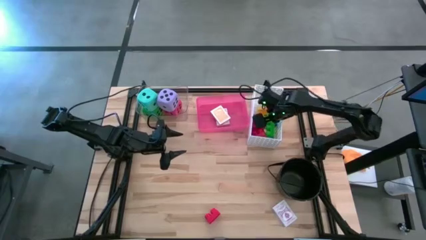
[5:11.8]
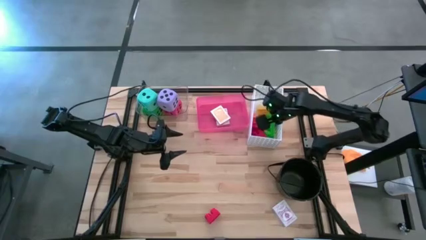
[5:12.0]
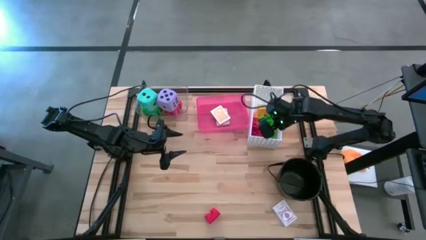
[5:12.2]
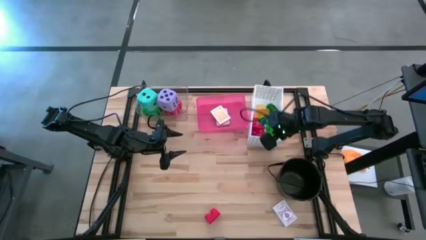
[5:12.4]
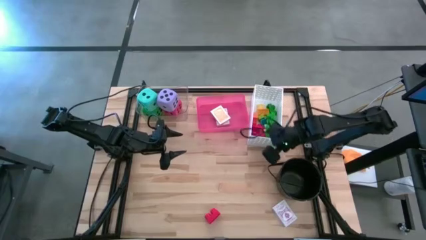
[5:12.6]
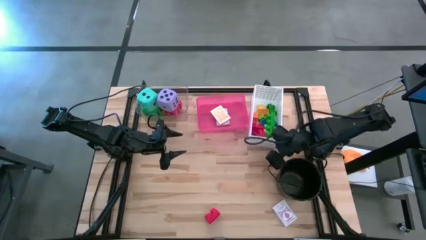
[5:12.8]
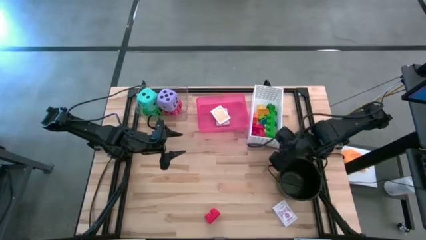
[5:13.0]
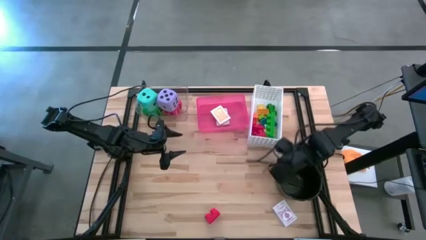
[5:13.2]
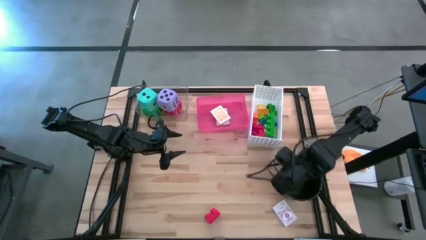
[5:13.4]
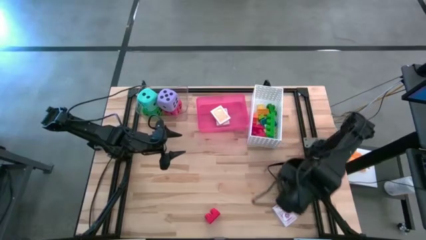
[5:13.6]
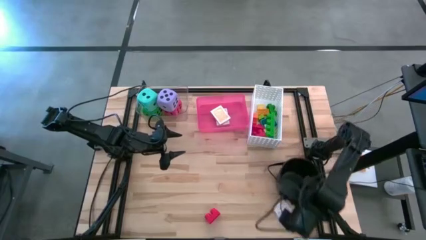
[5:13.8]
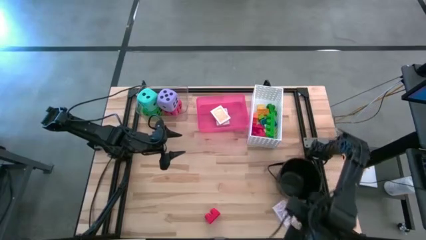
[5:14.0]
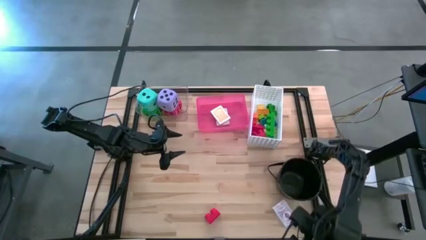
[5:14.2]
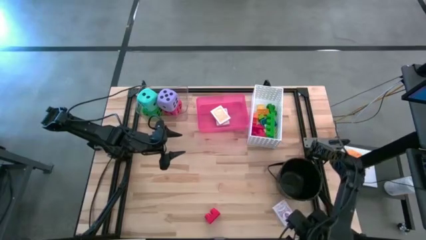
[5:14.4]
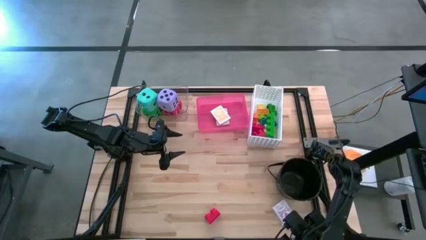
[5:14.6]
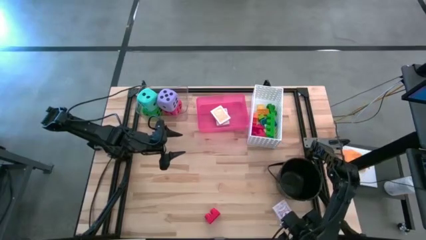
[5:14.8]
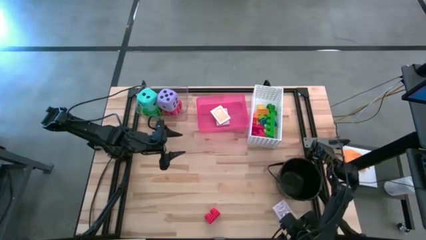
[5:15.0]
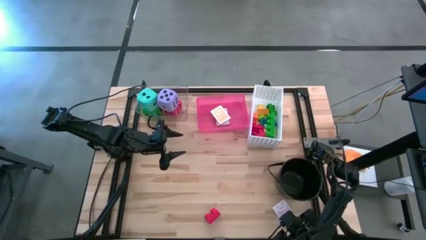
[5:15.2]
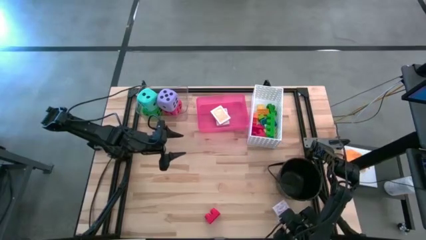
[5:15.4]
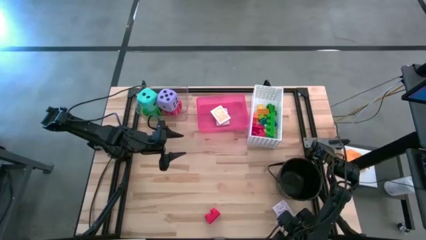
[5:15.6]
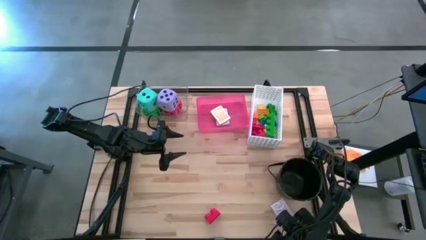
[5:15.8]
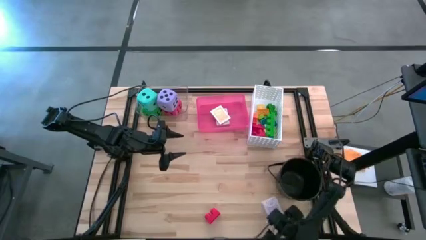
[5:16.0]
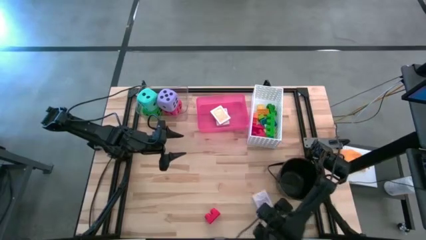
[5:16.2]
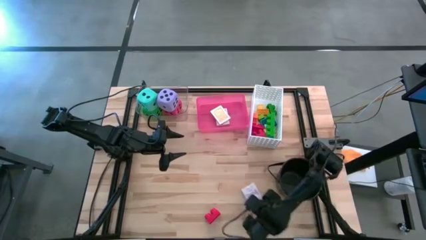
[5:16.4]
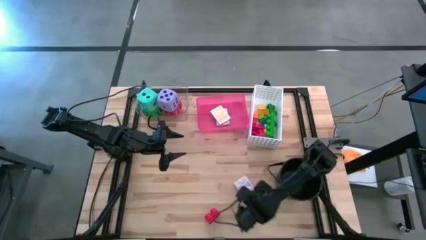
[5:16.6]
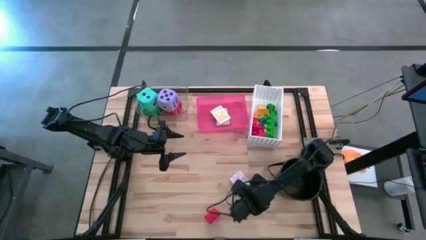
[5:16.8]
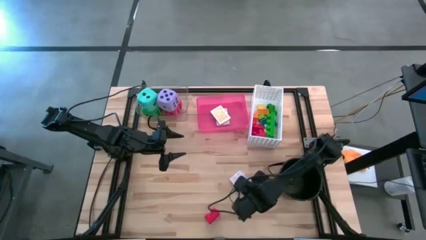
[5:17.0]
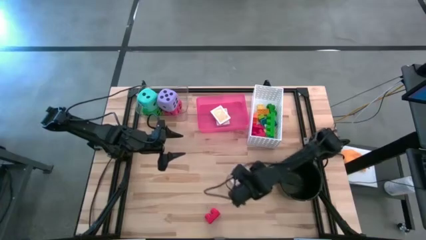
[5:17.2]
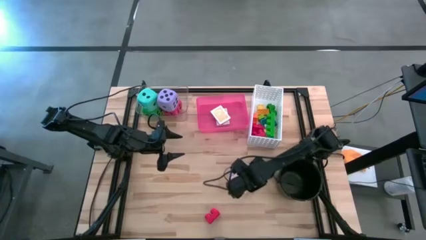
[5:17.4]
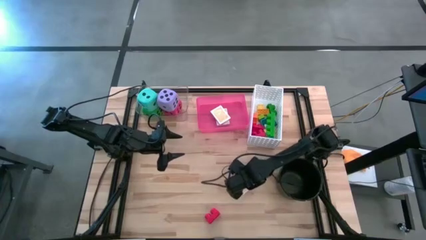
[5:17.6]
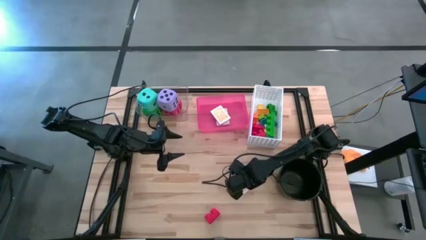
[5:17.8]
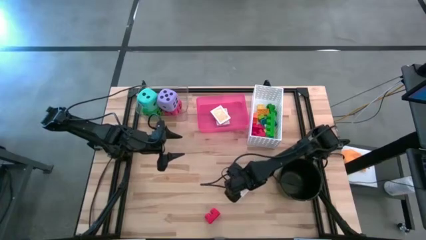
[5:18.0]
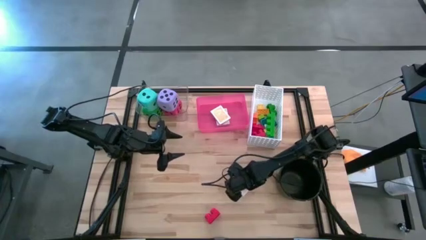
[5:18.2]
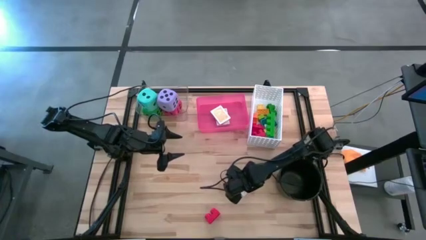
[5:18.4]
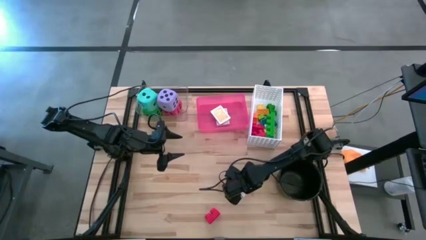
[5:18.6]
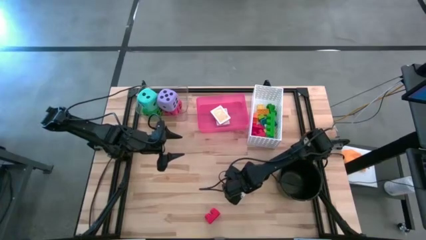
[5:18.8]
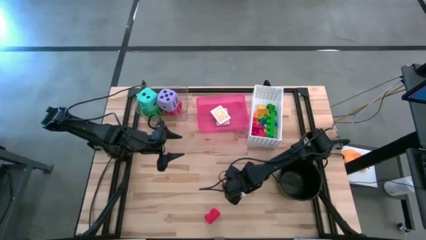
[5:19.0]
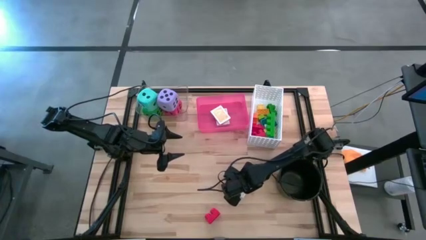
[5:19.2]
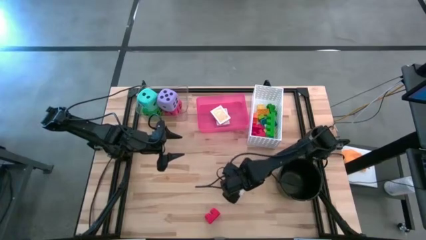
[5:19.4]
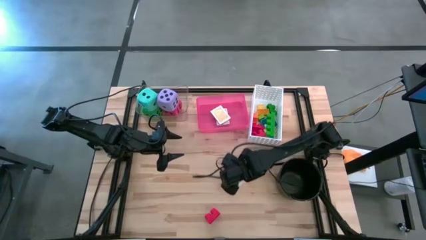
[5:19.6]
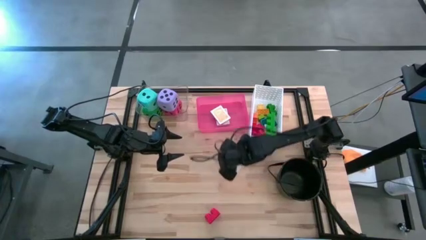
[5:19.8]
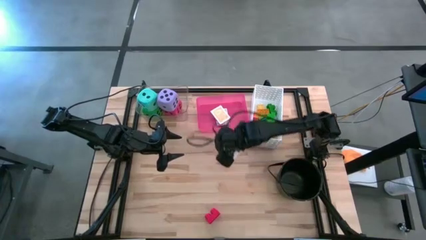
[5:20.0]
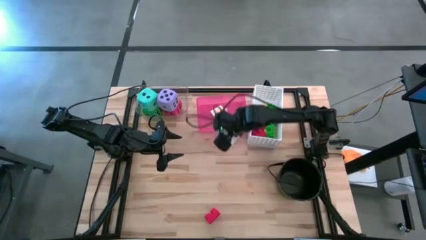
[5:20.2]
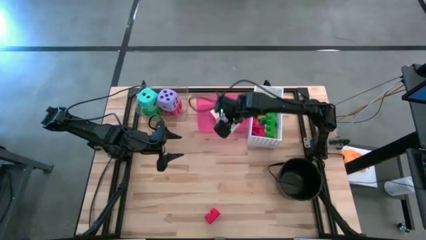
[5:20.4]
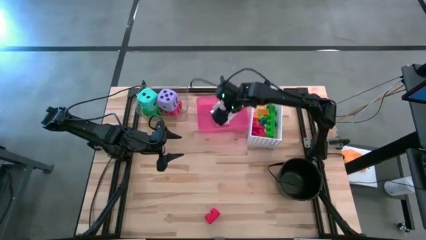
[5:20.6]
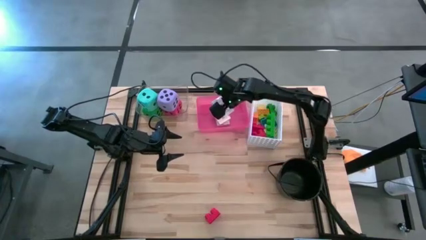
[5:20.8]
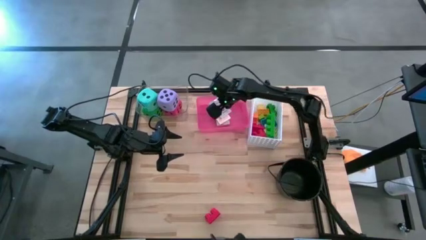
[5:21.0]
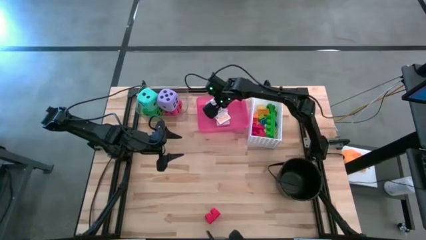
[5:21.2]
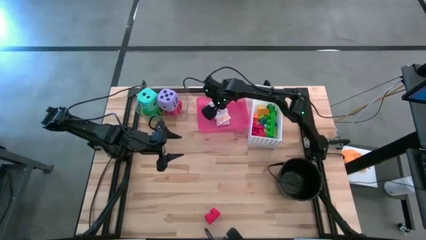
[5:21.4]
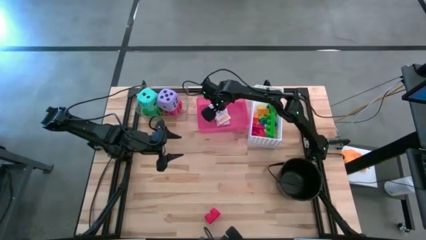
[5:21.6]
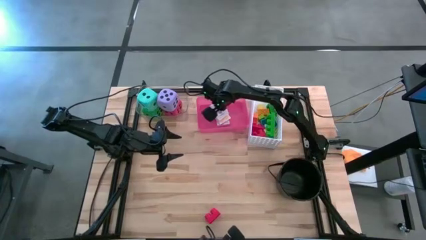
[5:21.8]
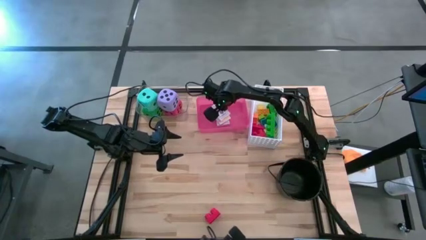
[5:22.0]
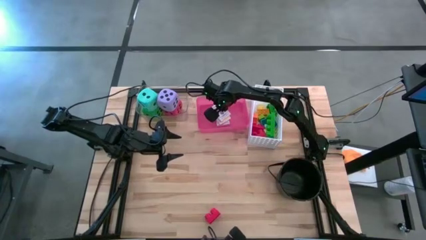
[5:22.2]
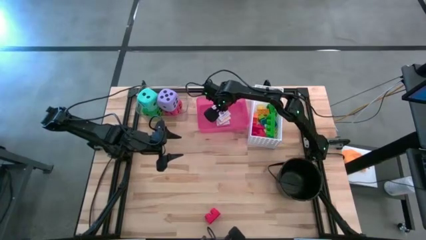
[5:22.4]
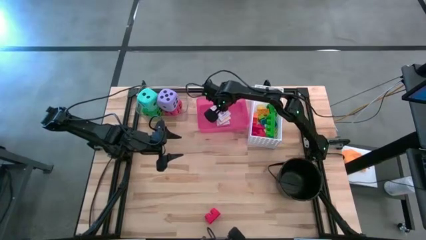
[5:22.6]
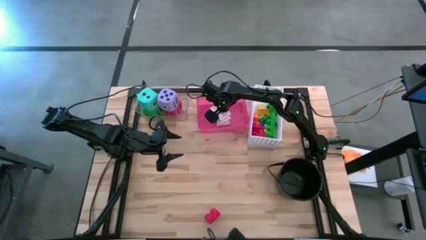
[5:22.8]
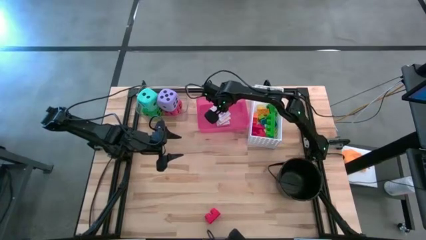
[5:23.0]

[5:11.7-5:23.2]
Task: Pick & Place Toys
Put the purple deck of cards into the pink bin

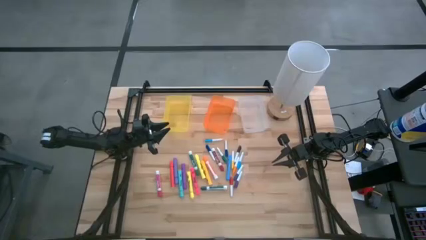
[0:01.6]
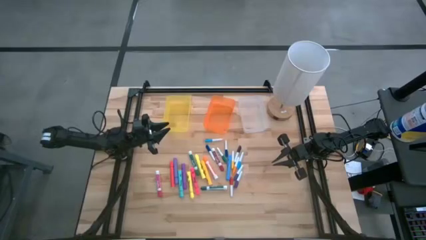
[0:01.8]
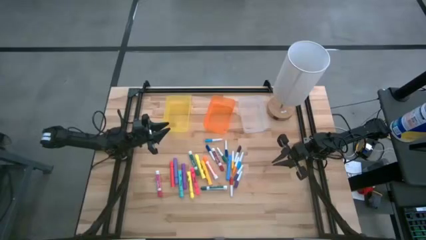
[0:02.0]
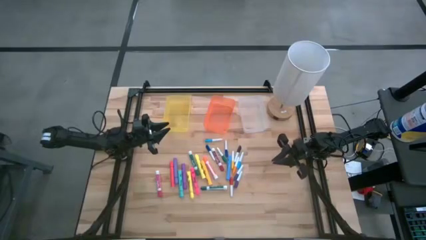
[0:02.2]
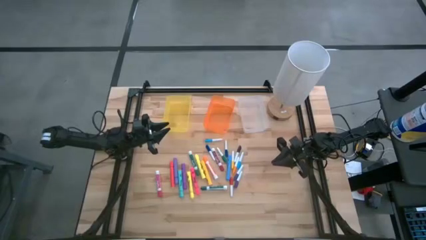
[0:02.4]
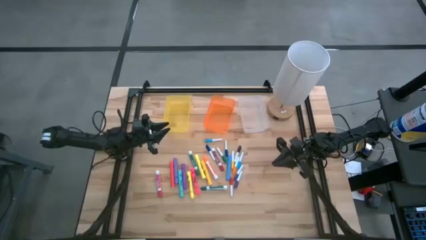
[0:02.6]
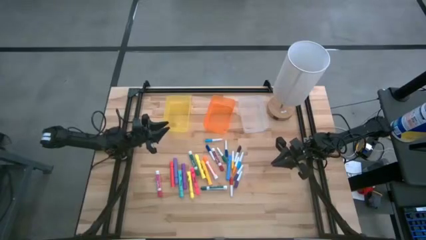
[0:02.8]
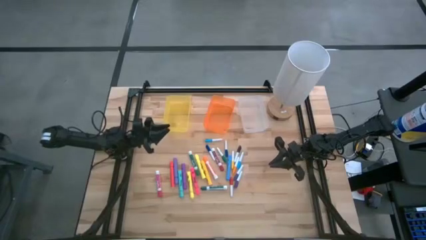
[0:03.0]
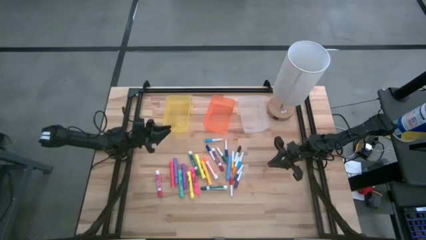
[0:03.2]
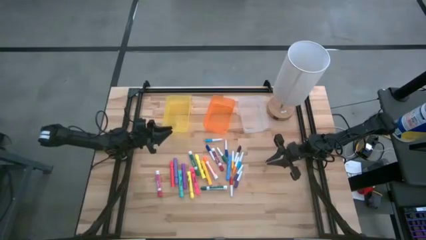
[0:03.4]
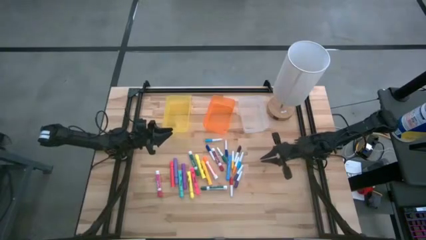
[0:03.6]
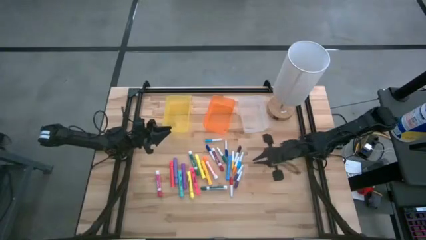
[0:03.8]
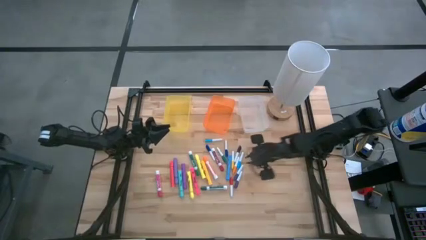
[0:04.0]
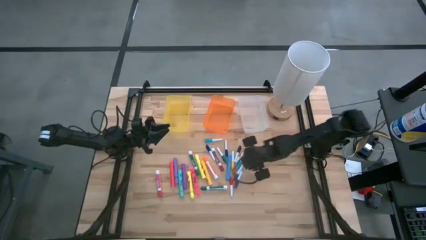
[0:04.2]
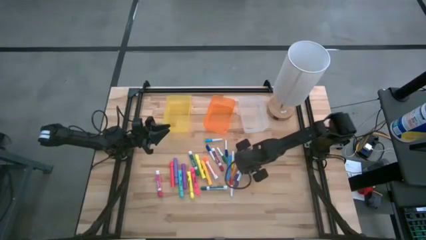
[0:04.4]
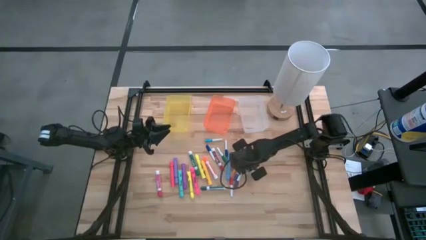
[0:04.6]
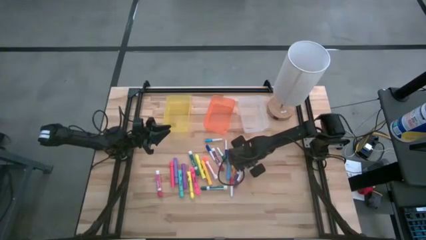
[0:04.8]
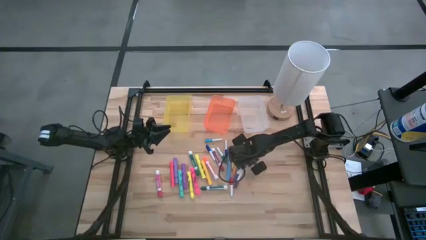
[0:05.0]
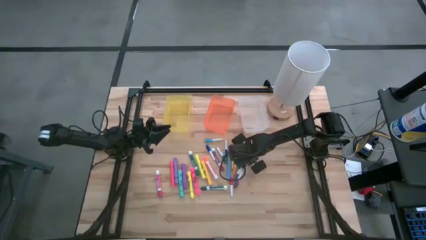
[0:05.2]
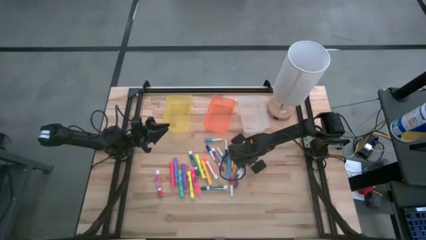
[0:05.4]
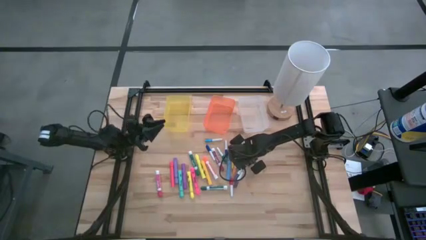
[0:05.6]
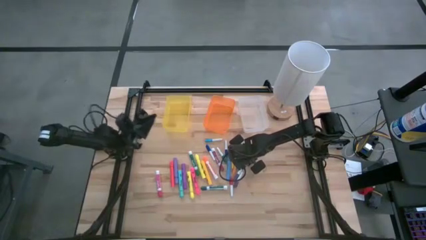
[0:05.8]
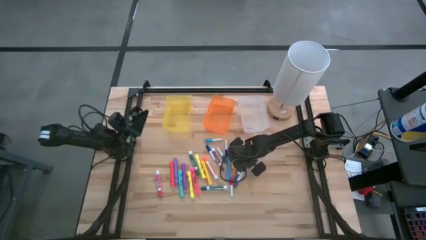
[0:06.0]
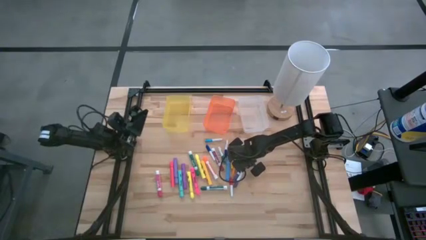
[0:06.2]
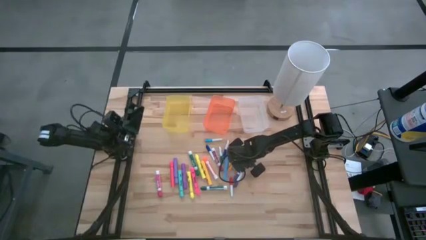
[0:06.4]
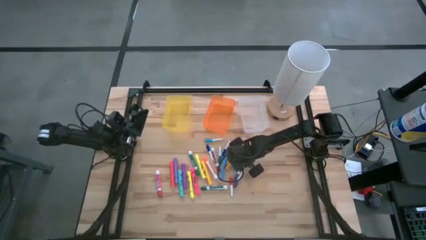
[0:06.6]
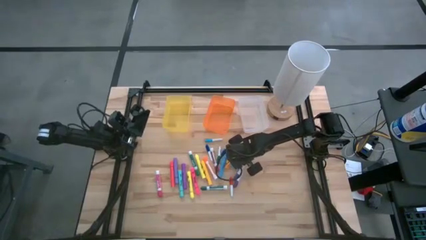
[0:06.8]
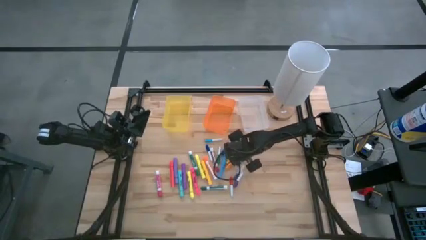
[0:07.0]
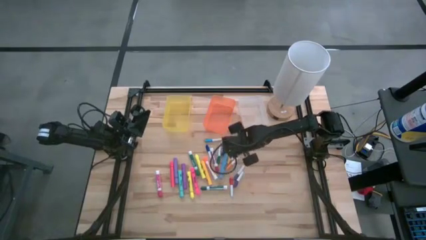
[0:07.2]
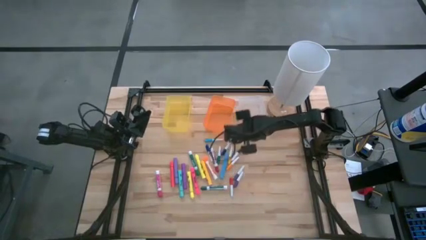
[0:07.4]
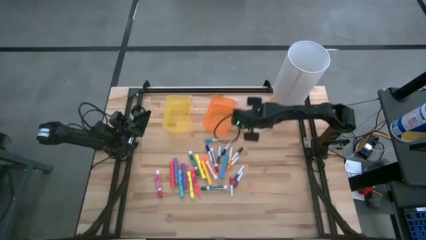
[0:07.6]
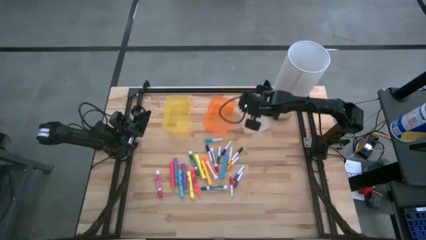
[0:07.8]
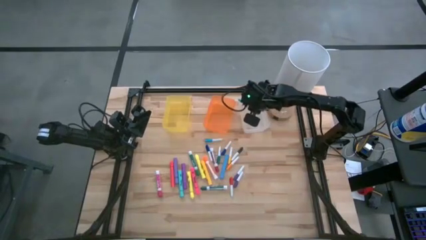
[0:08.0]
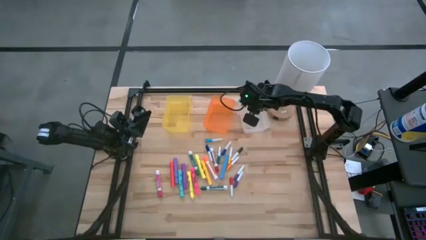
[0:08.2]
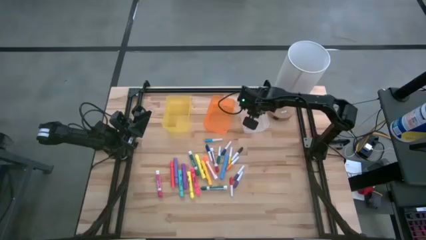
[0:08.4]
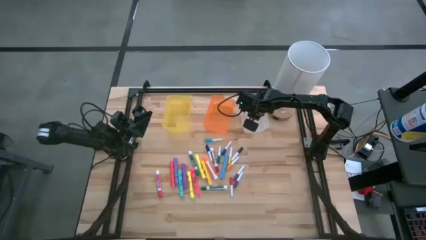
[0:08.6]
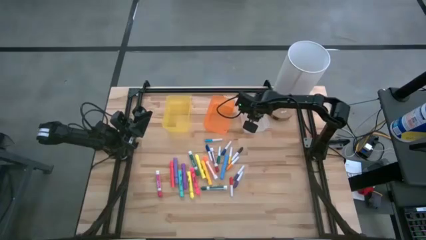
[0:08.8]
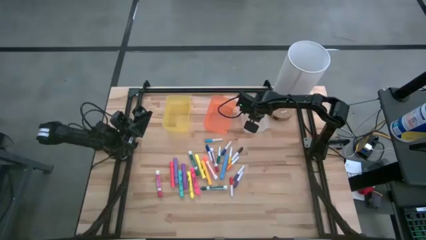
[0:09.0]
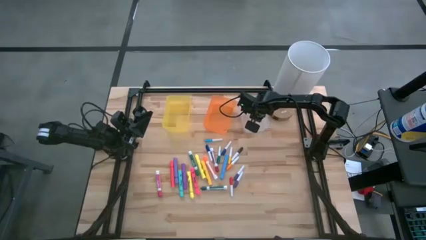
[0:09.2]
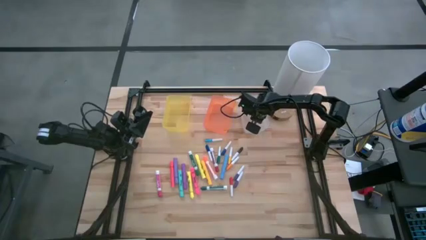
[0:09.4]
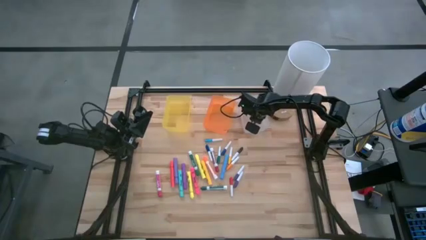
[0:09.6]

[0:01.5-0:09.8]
Task: Pick & Place Markers
Put the bottom light blue mini marker into the white bin
